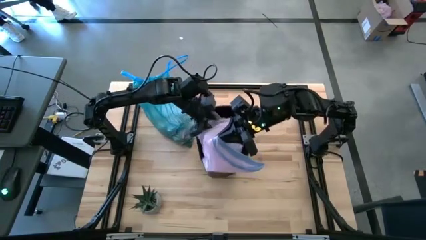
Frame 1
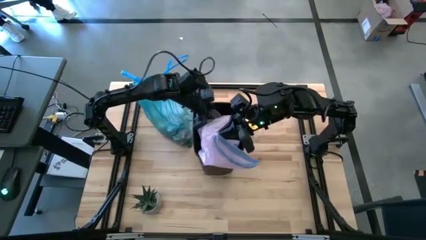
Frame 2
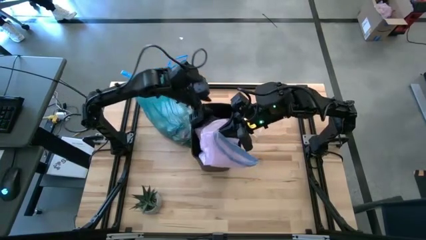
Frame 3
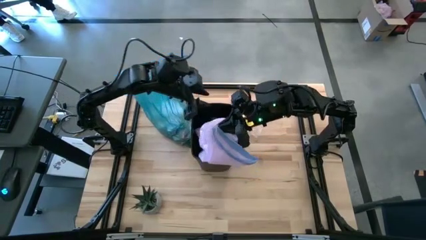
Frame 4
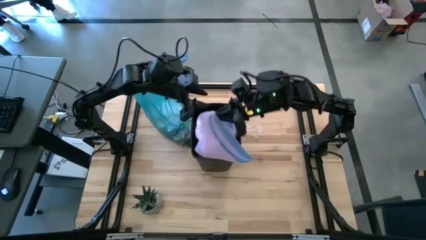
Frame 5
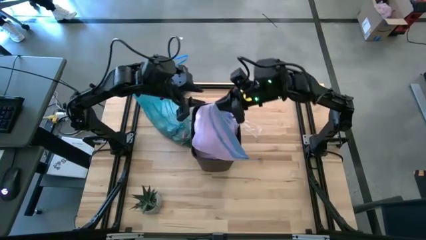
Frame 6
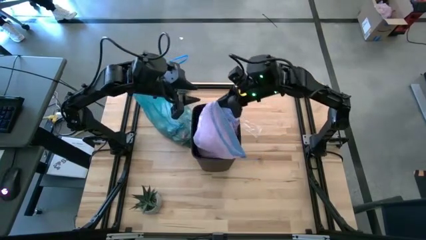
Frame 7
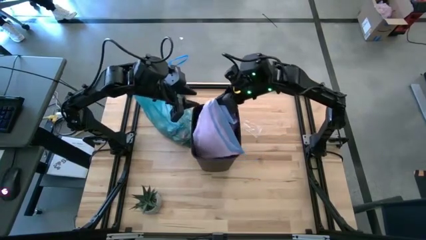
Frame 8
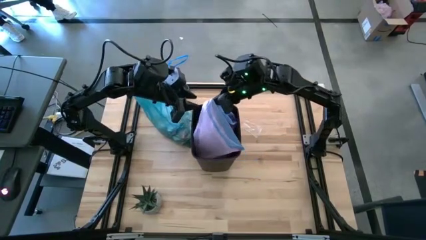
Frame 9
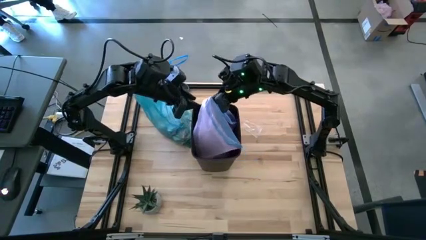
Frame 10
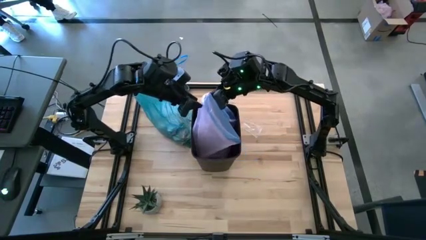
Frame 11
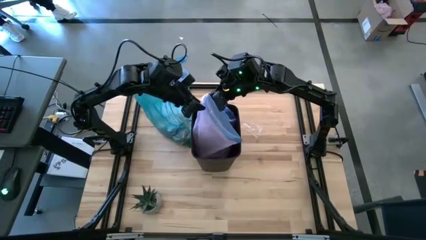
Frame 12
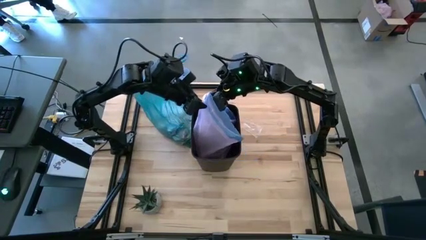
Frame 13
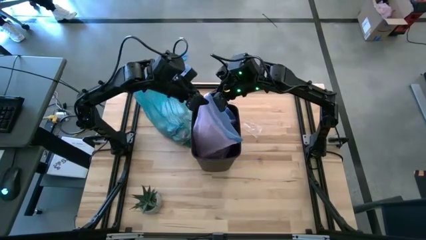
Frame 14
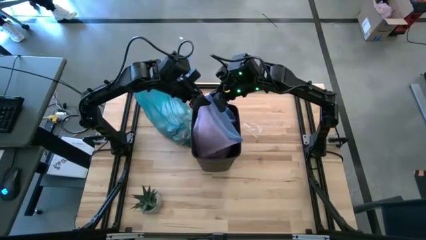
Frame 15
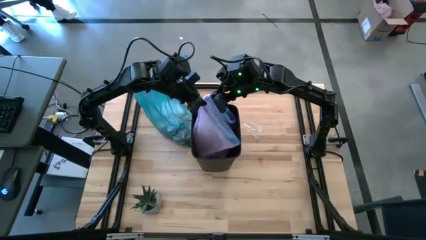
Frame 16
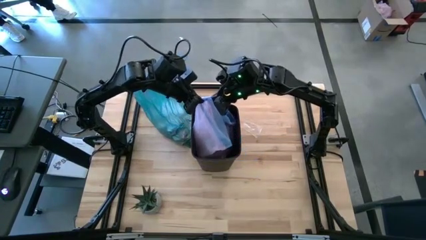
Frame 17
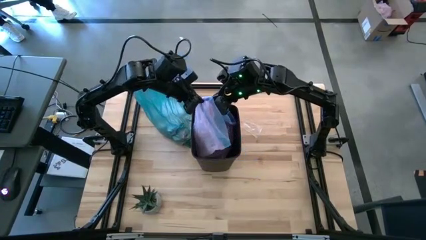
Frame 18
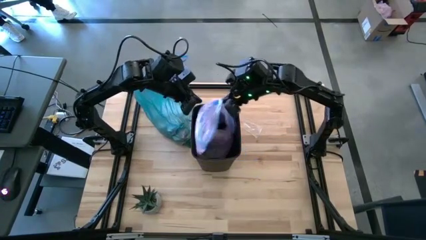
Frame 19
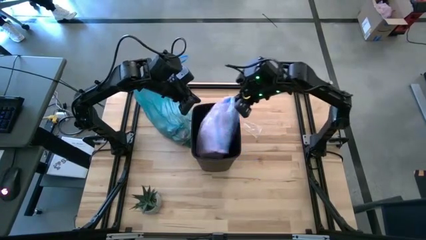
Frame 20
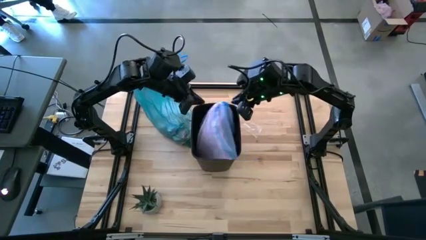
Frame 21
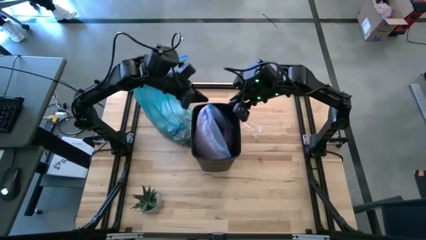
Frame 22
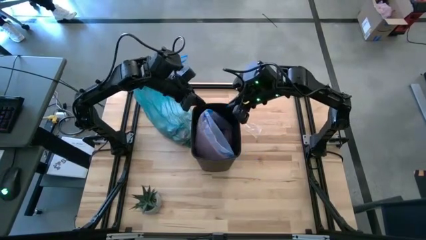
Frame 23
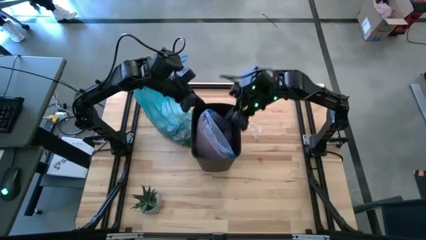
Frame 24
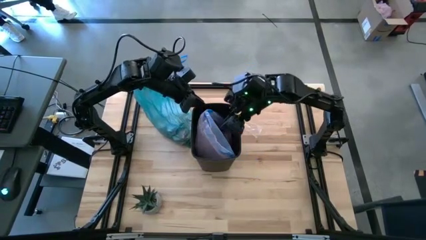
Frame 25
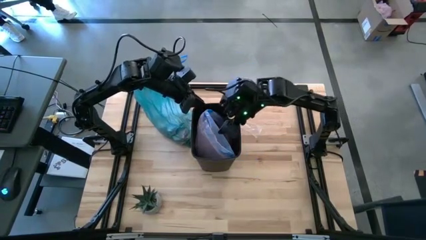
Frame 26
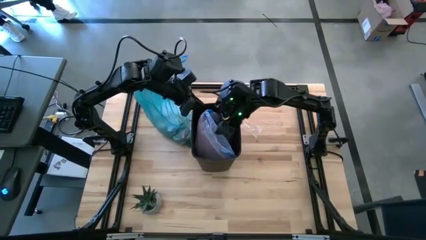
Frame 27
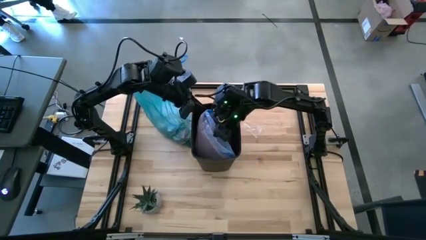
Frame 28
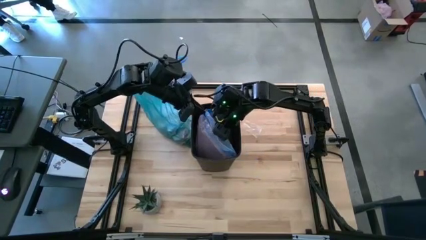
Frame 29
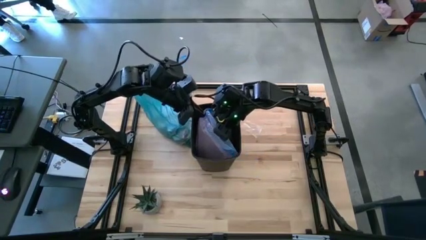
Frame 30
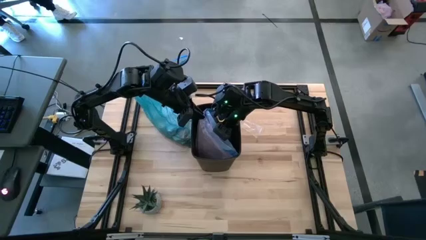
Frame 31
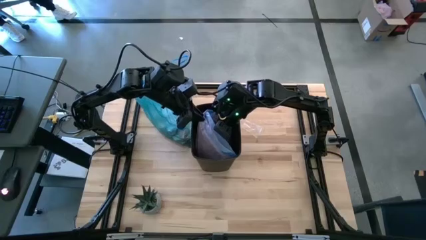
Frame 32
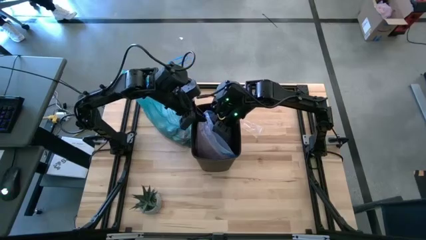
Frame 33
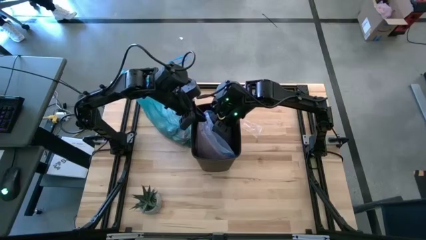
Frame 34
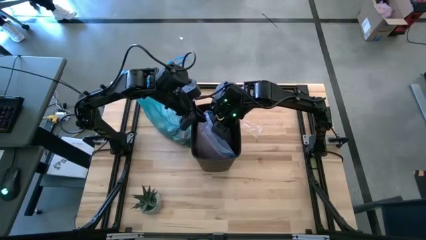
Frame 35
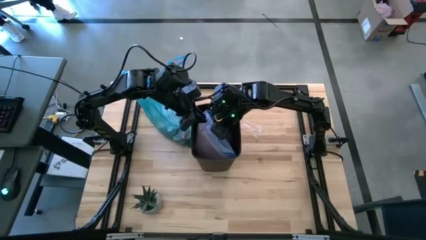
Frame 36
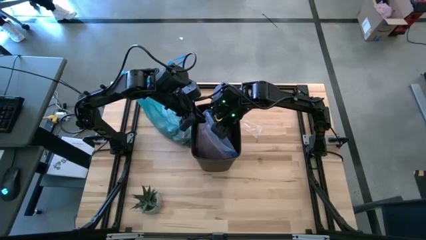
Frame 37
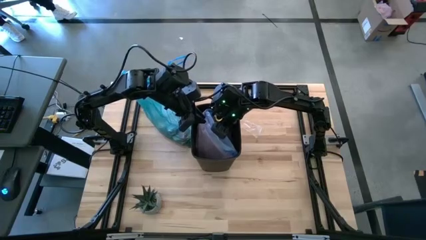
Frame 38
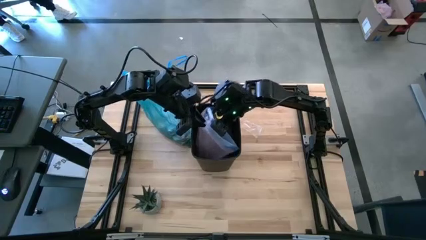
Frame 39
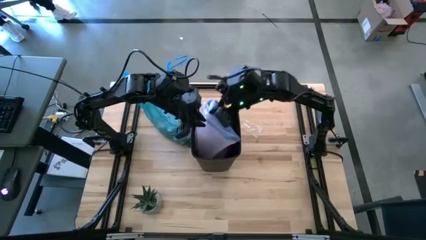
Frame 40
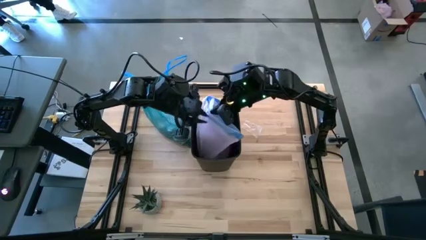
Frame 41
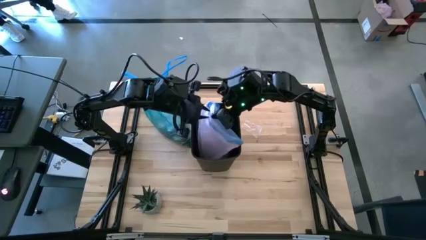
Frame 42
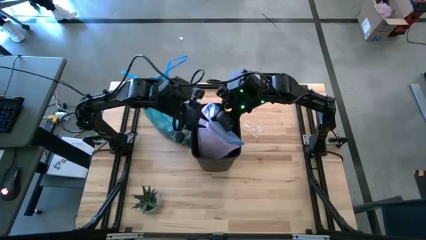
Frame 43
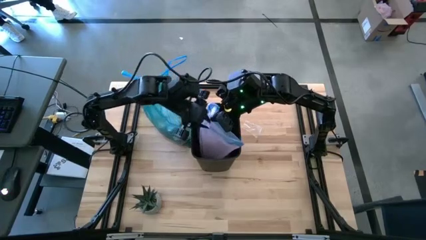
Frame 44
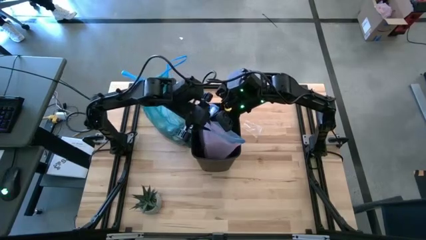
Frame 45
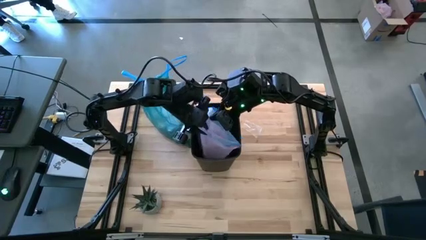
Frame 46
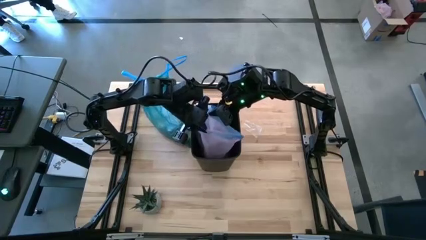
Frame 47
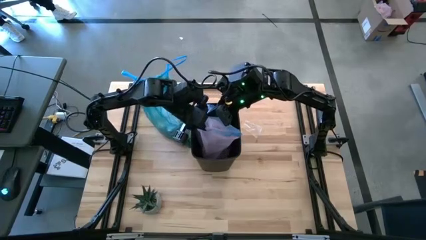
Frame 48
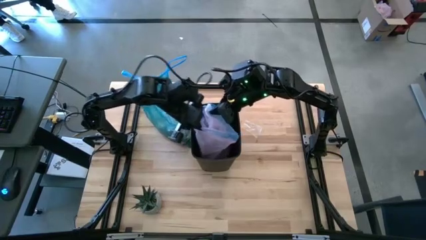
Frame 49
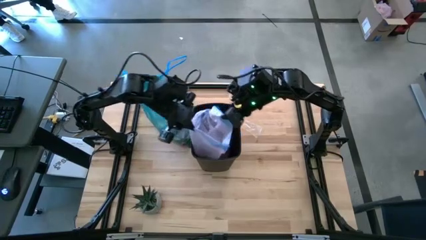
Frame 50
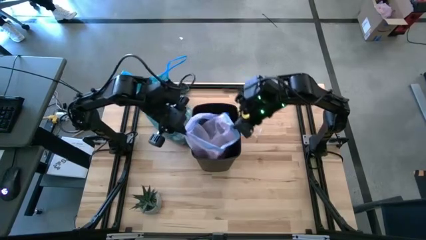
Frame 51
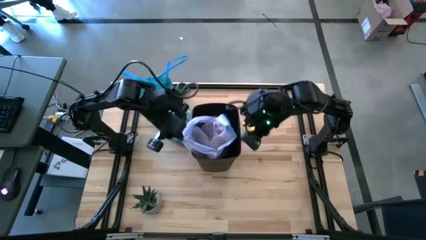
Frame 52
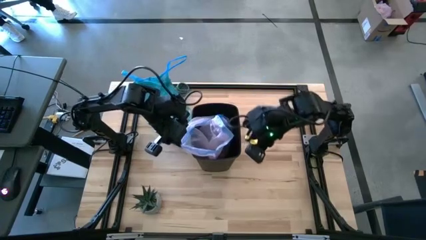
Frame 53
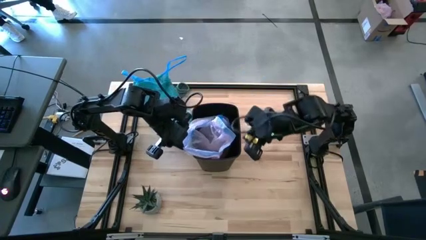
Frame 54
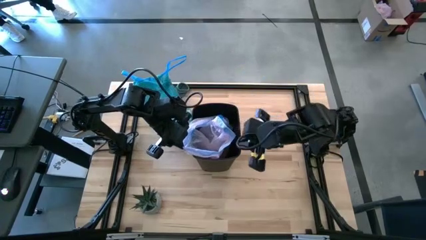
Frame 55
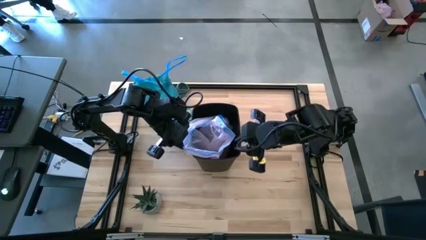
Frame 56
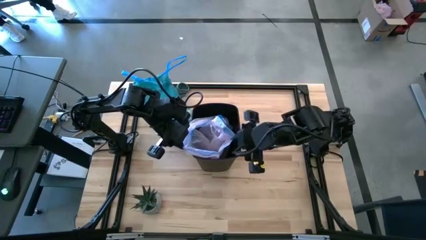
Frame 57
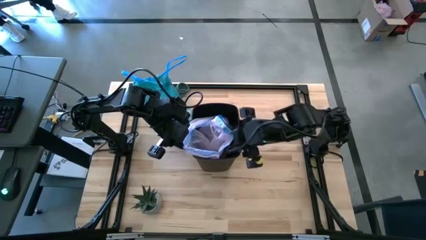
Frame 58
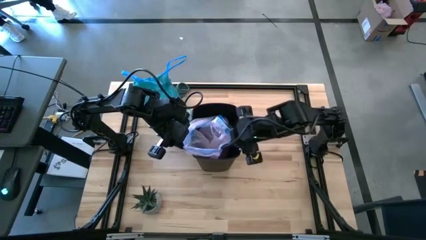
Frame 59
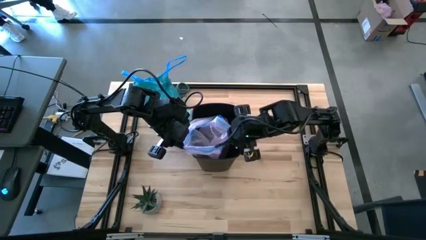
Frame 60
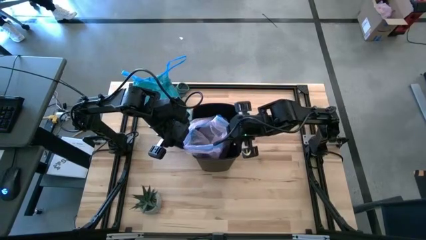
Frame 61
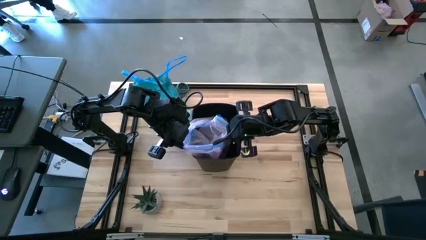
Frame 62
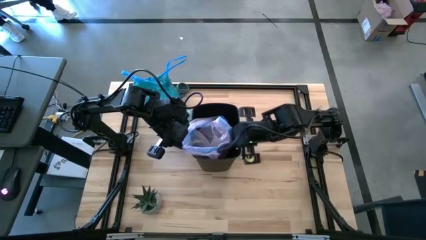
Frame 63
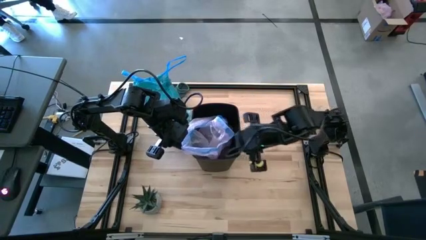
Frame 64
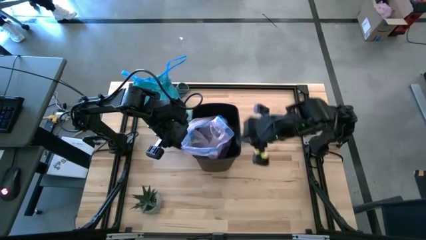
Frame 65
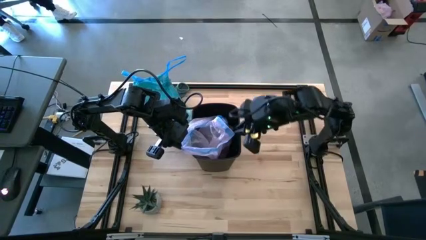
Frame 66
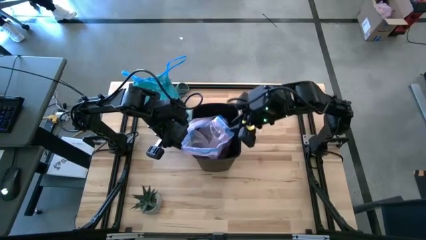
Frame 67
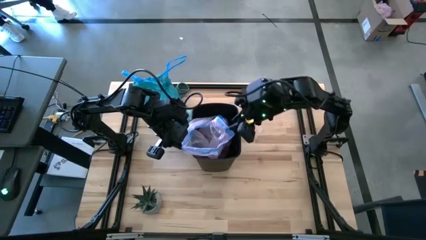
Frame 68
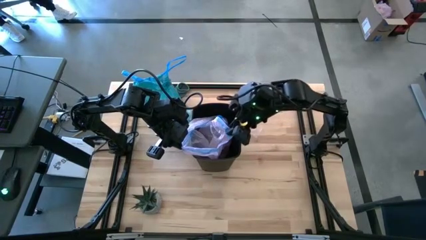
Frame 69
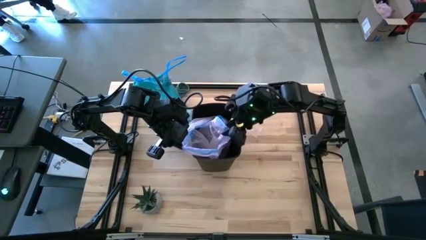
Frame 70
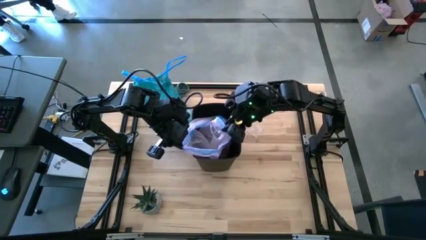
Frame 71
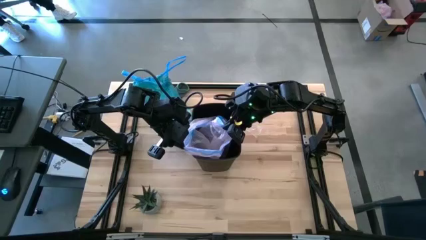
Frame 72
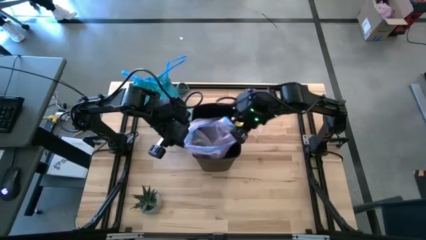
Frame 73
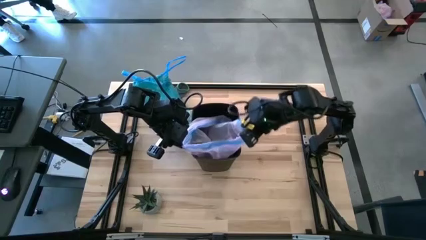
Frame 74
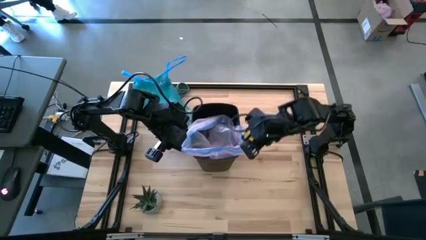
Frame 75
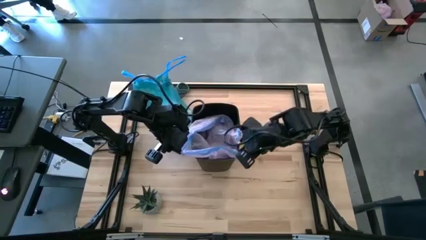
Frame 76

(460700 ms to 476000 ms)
Task: place trash/remove bag and relplace
Insert the pink trash bag into the trash bin
